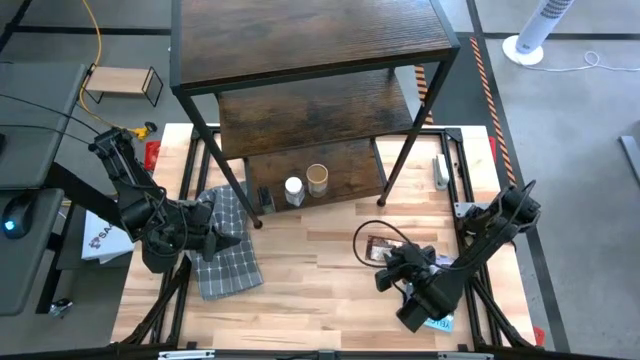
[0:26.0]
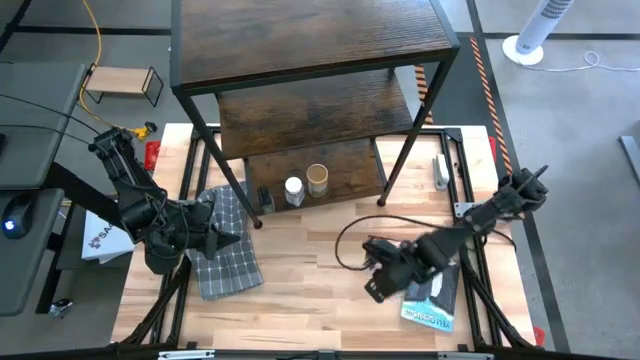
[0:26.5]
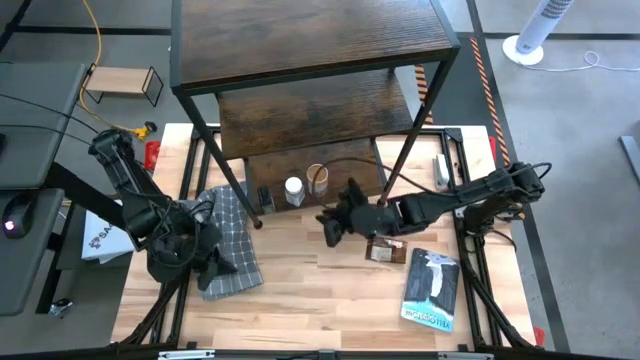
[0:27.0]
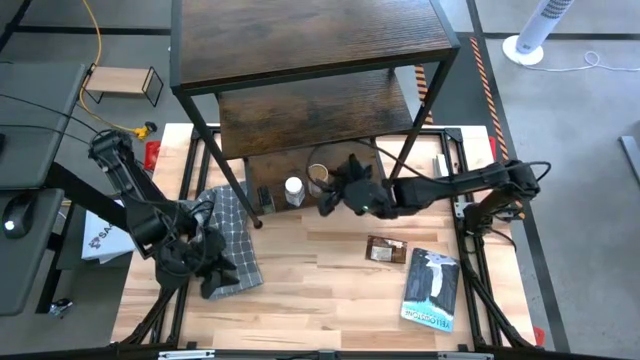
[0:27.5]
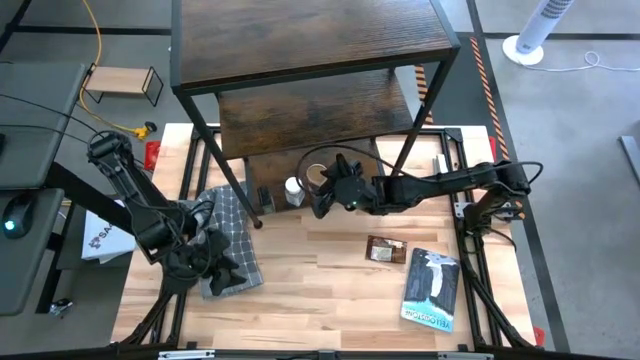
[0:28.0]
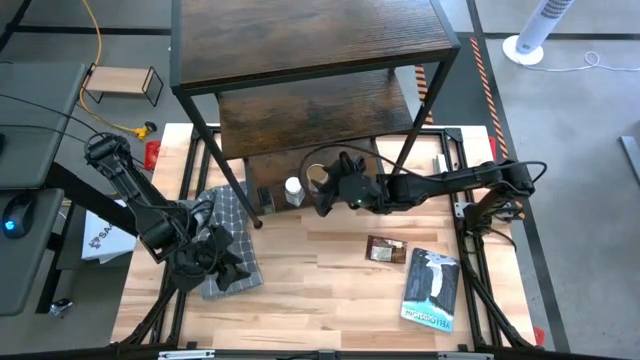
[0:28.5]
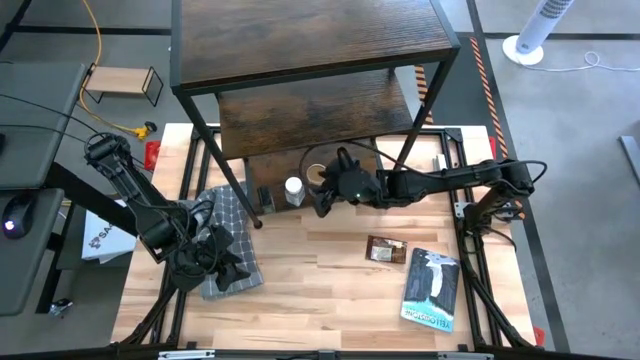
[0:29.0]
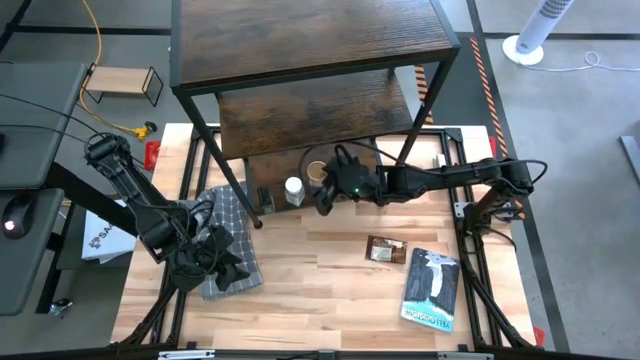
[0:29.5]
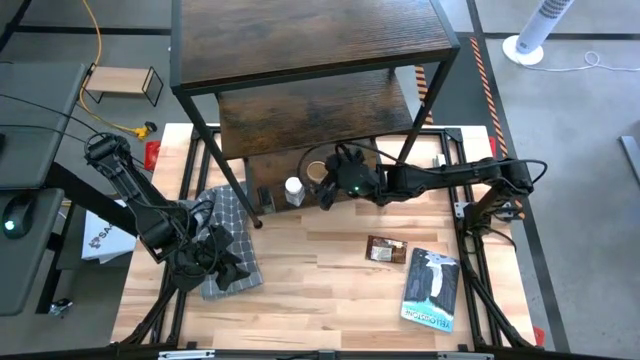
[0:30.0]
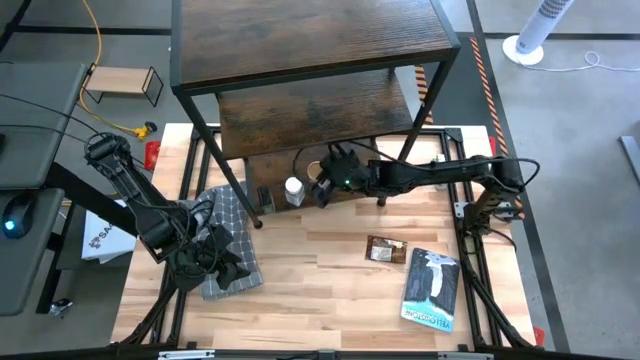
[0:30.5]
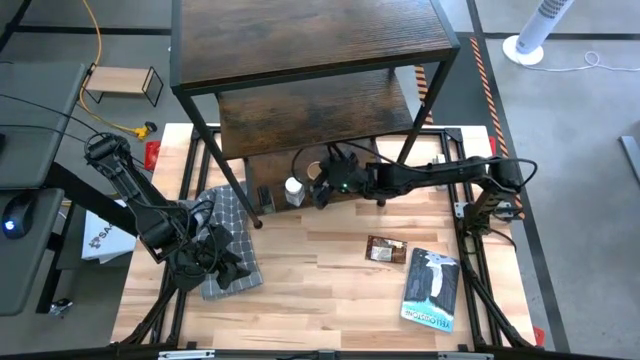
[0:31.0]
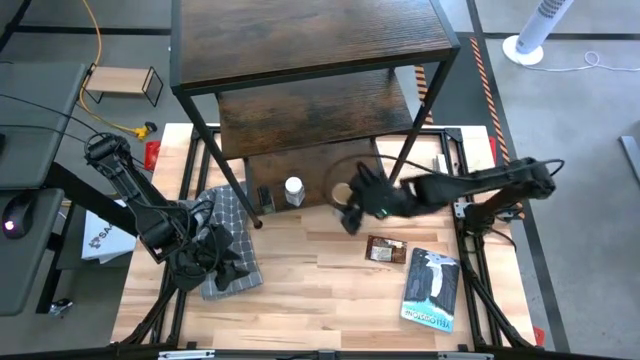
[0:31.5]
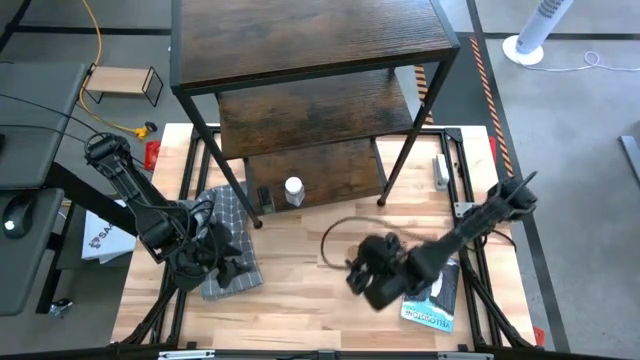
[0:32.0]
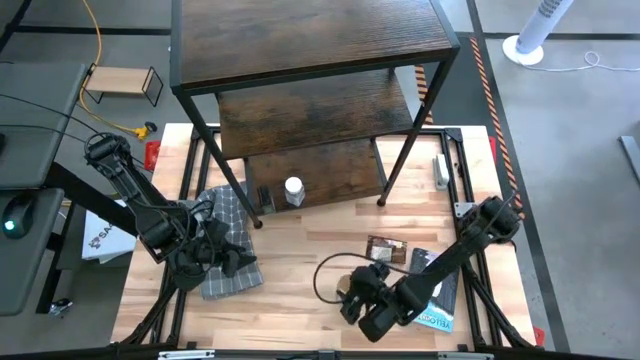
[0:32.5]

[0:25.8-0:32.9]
Task: Shelf spices
Remove the gold seasoning bottle from the shelf

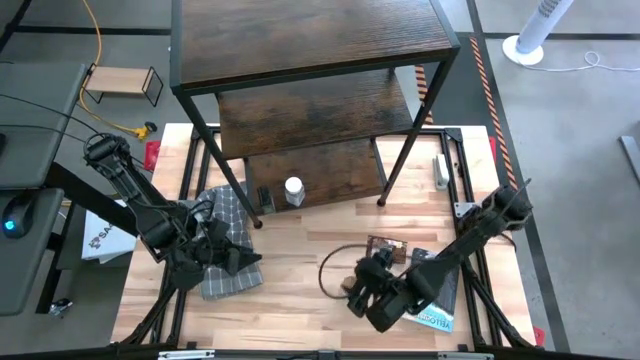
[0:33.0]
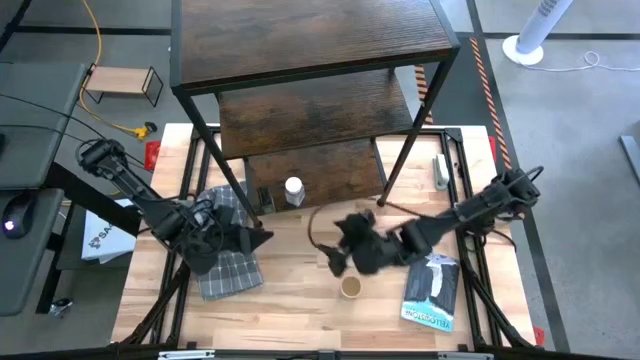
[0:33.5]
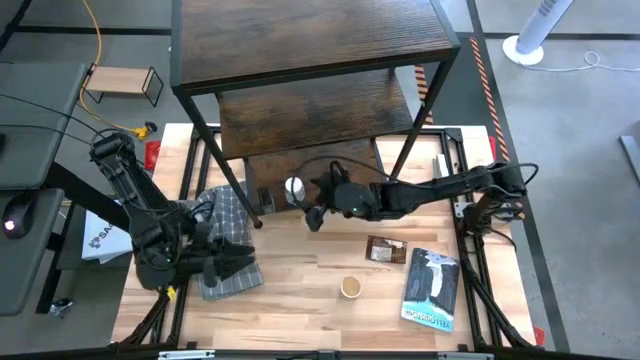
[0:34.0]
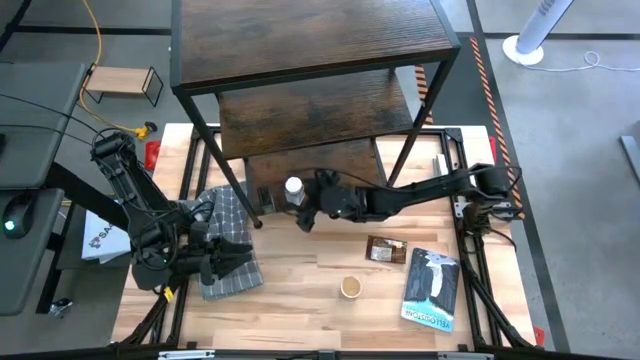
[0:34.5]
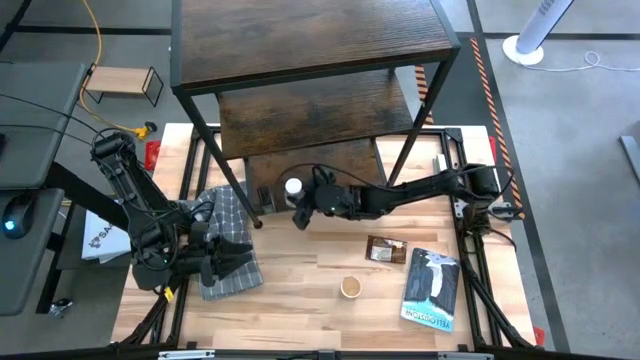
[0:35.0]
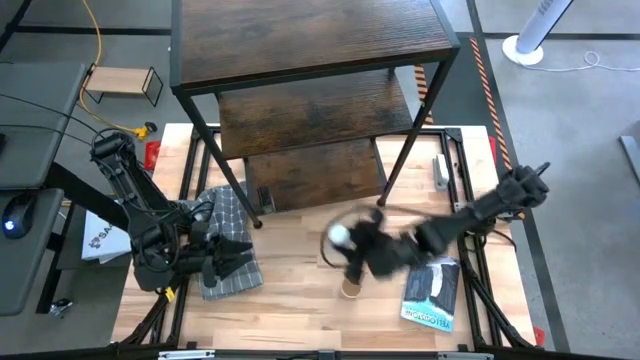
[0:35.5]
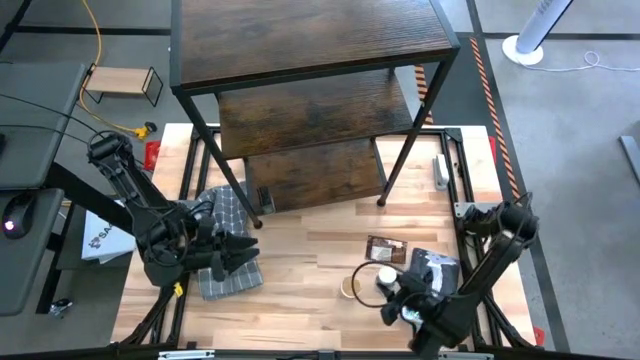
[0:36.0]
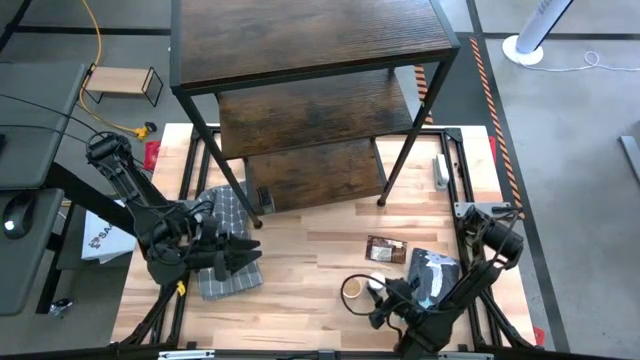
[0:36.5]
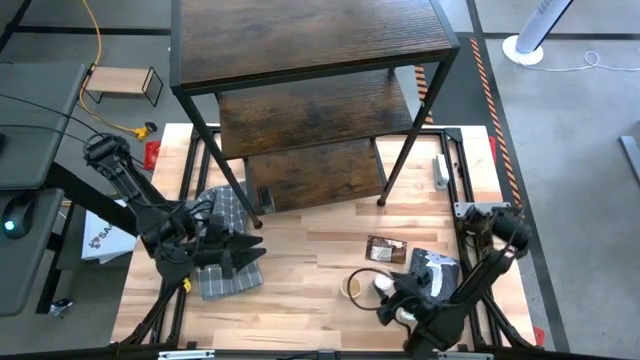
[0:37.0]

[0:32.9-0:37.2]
Remove the white seasoning bottle from the shelf

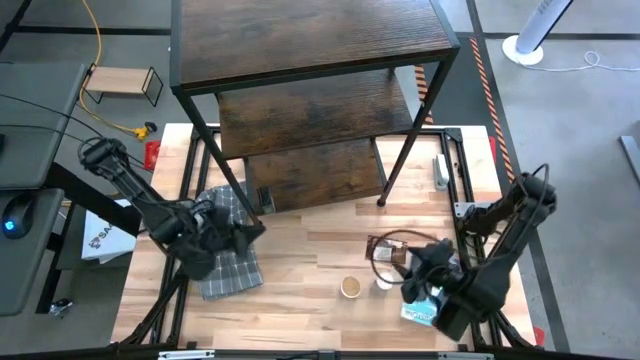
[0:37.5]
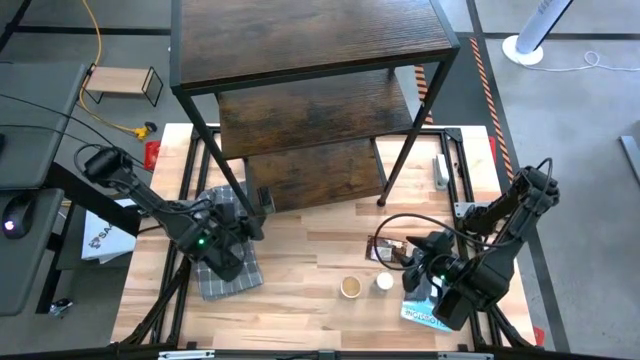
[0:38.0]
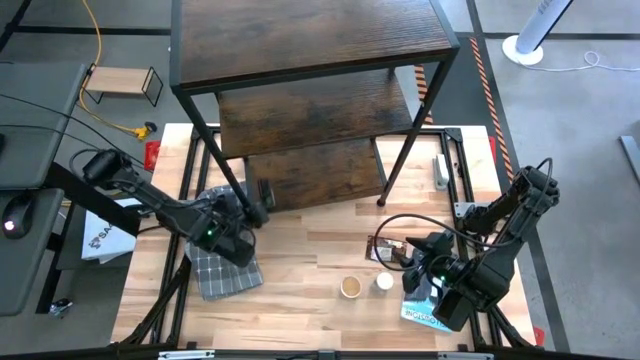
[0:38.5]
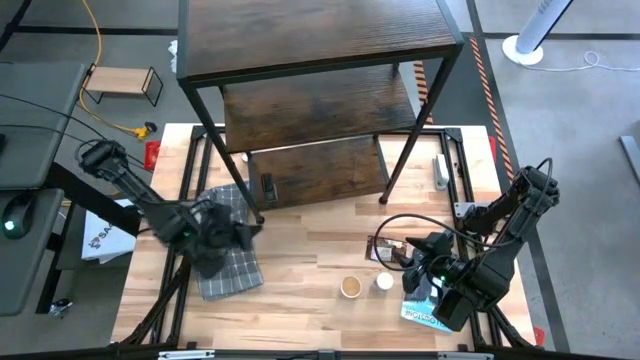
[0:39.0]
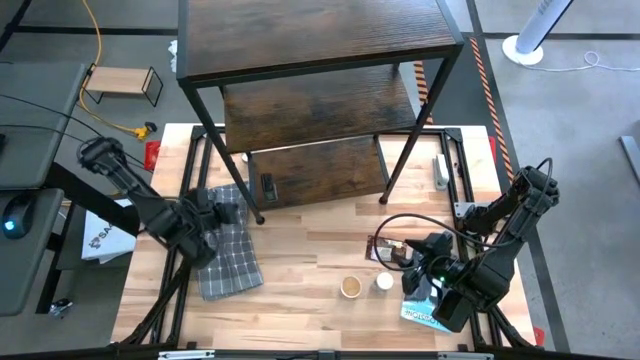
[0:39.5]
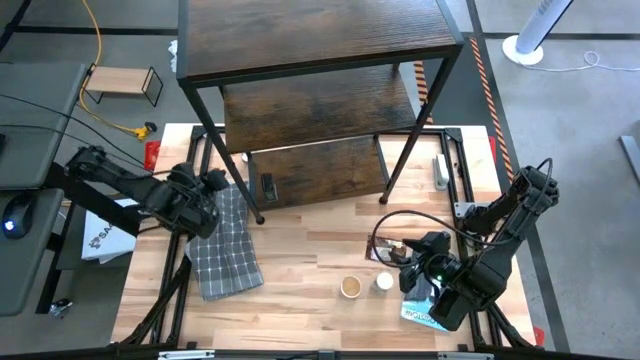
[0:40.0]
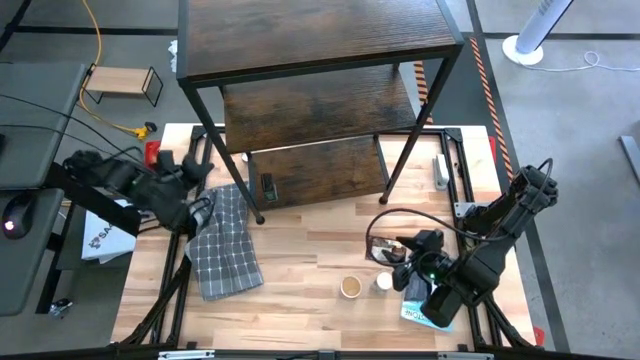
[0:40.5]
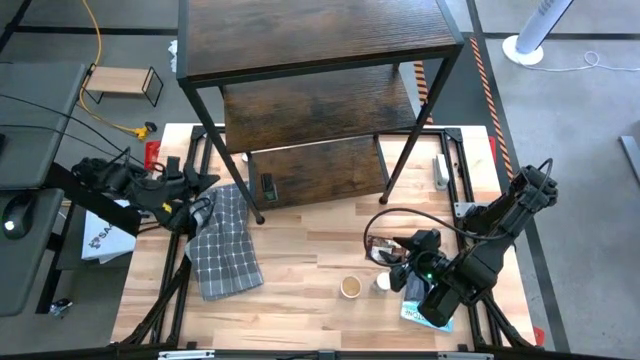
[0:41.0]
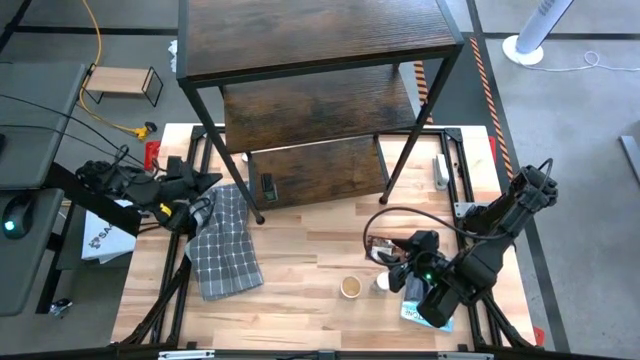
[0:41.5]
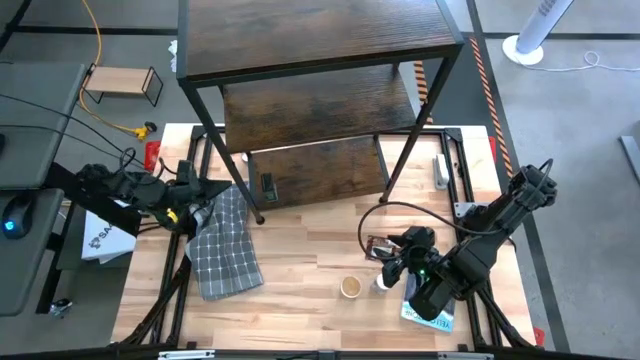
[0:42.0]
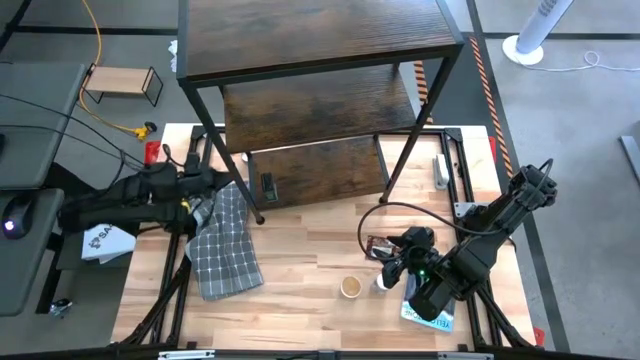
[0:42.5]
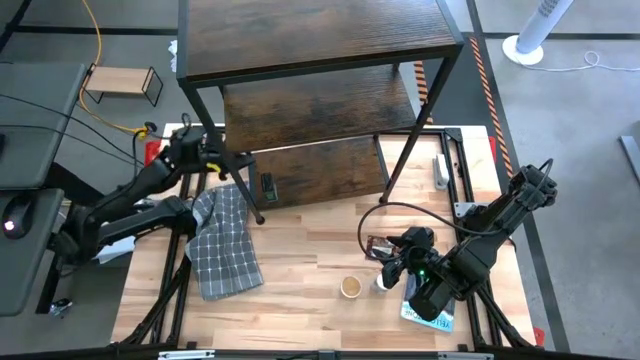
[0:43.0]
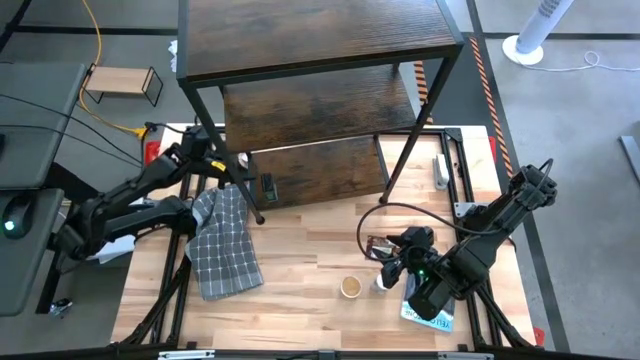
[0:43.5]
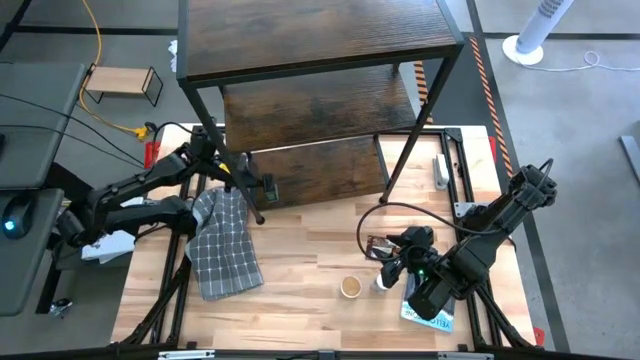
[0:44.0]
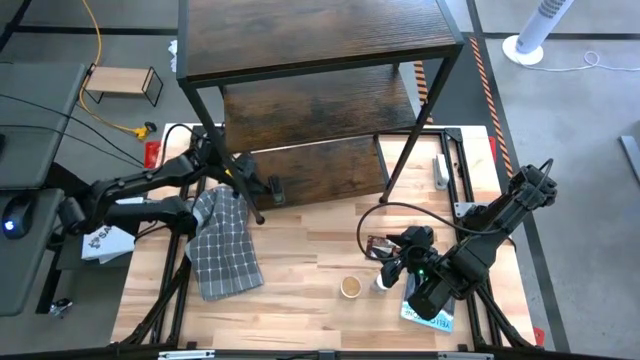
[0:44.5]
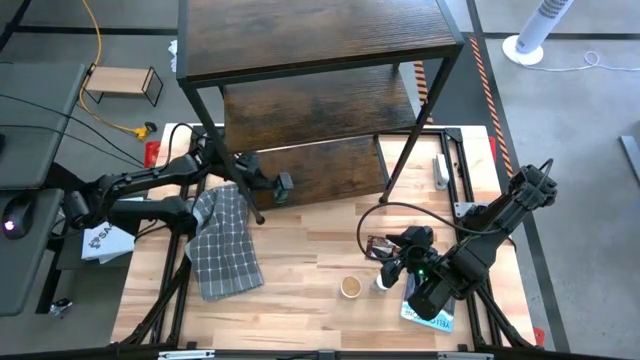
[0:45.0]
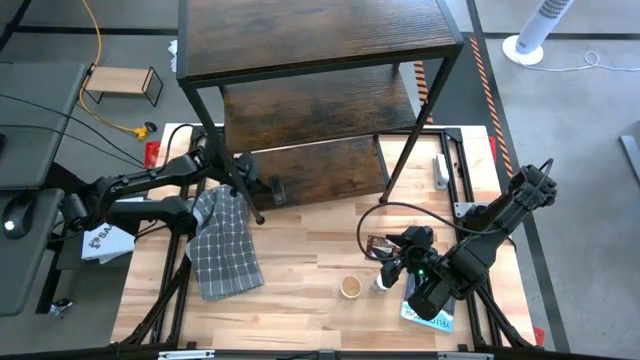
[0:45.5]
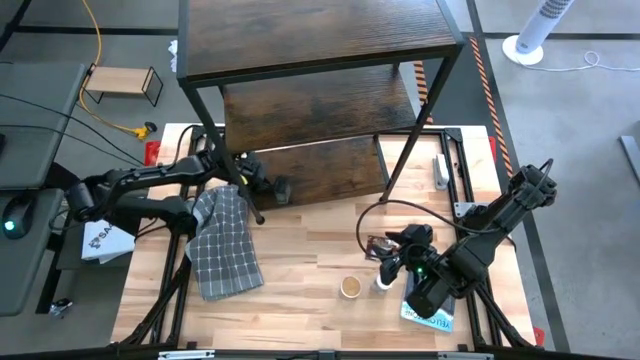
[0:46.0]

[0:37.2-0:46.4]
Adjust the green seasoning can on the shelf

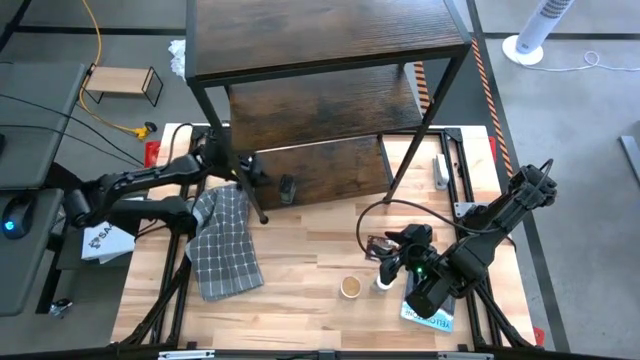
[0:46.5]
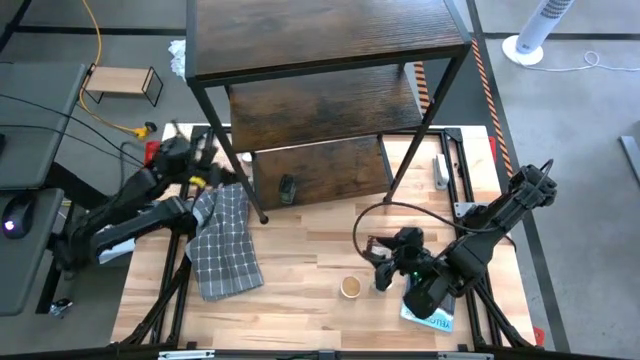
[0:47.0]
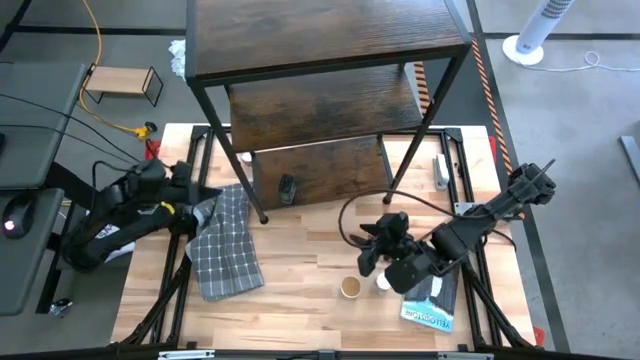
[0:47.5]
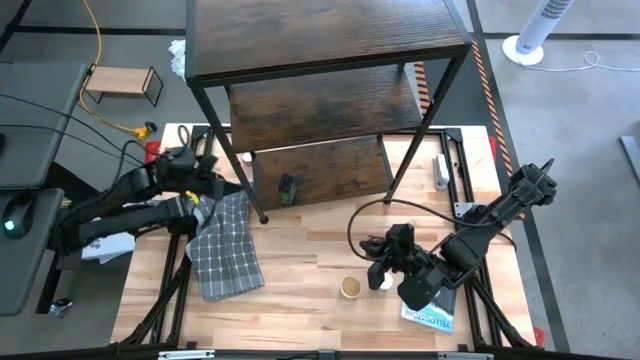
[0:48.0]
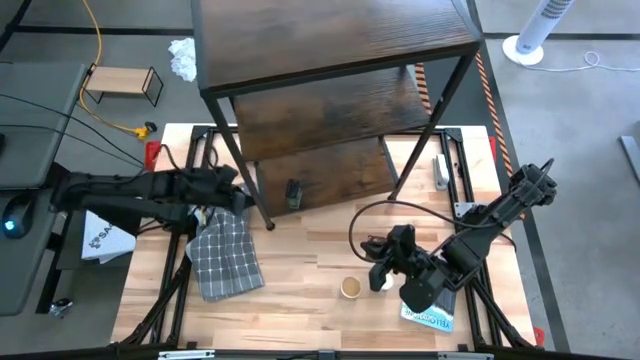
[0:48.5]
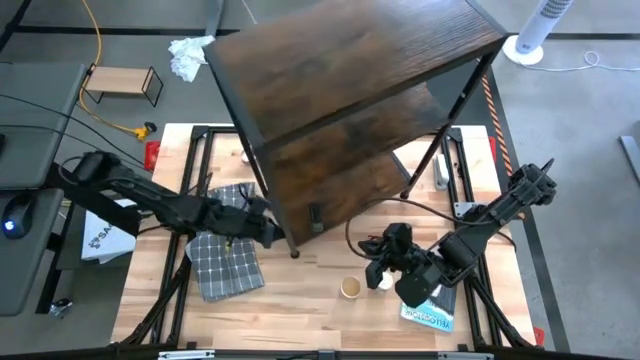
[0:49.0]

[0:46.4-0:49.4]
Adjust the shelf
